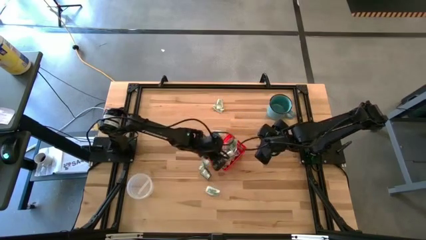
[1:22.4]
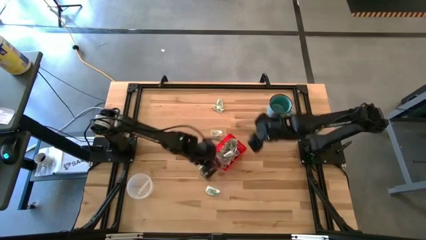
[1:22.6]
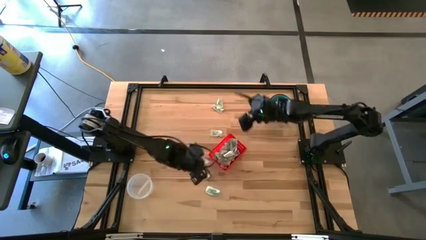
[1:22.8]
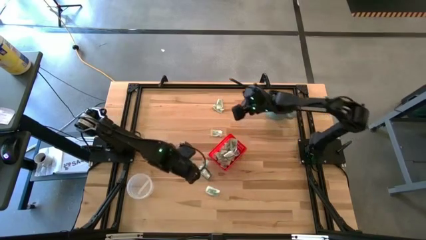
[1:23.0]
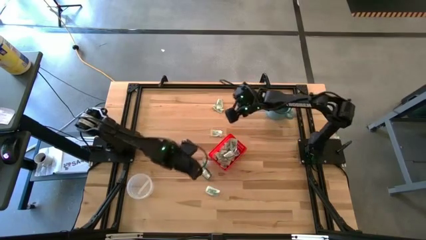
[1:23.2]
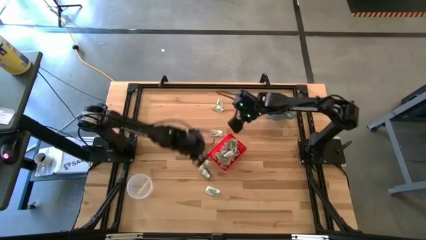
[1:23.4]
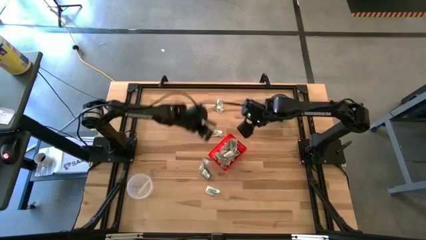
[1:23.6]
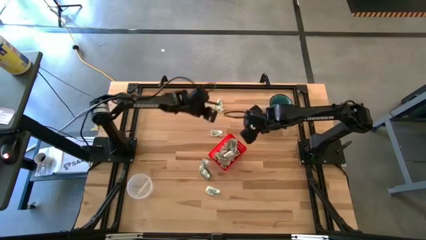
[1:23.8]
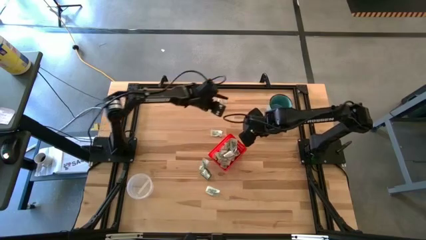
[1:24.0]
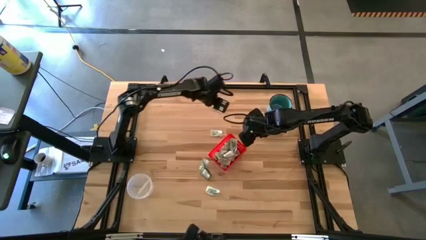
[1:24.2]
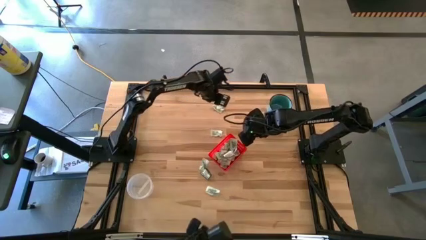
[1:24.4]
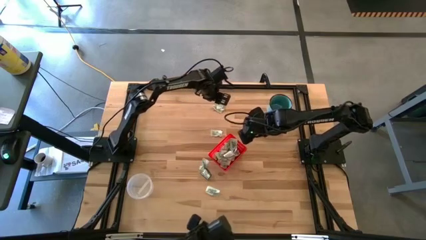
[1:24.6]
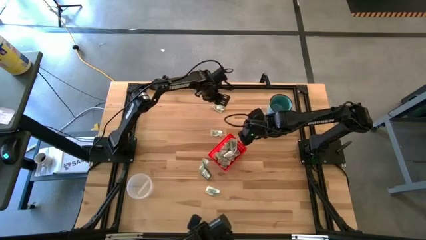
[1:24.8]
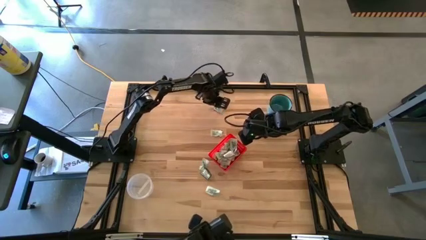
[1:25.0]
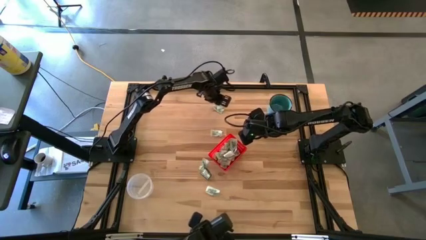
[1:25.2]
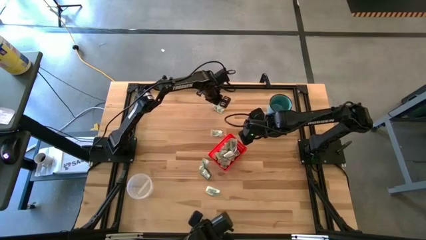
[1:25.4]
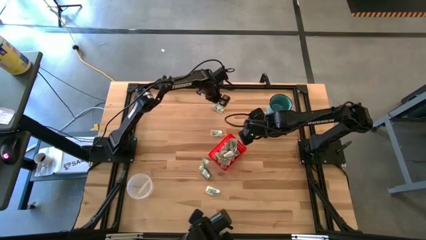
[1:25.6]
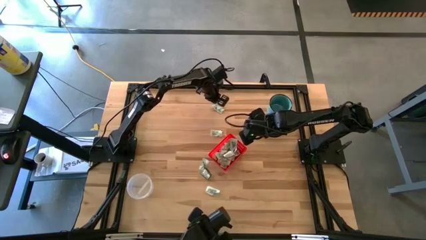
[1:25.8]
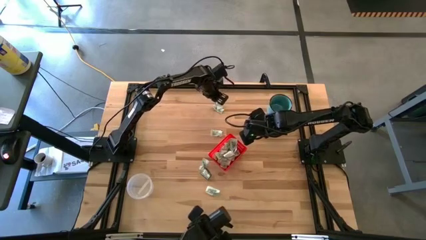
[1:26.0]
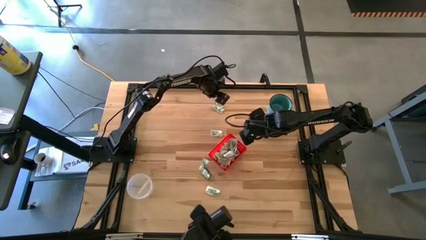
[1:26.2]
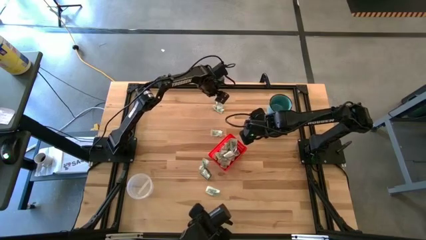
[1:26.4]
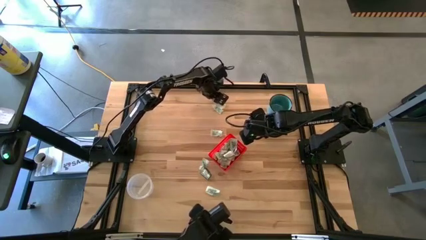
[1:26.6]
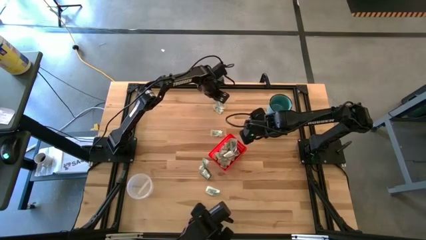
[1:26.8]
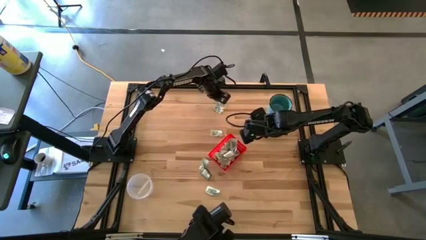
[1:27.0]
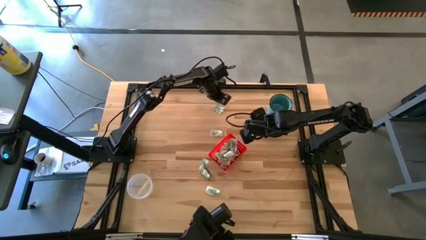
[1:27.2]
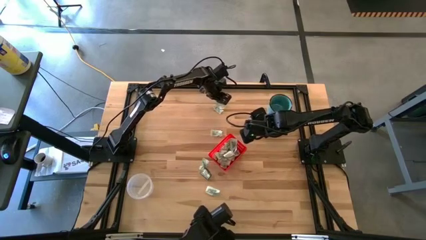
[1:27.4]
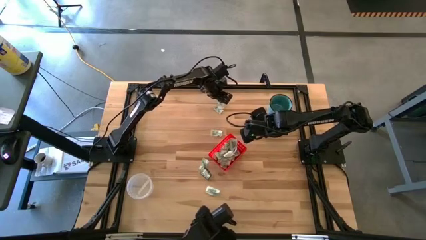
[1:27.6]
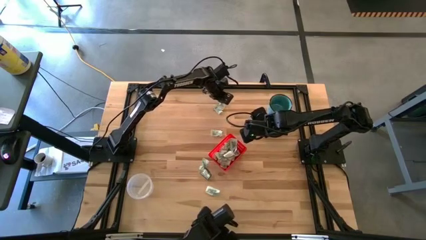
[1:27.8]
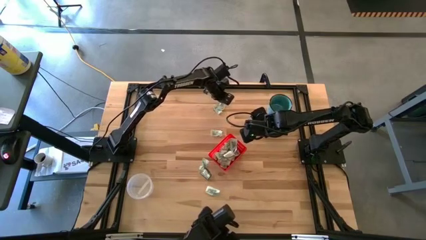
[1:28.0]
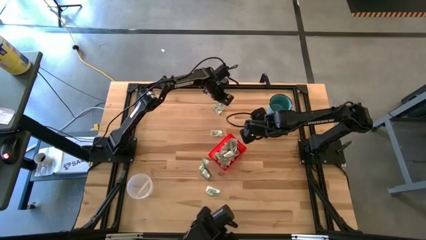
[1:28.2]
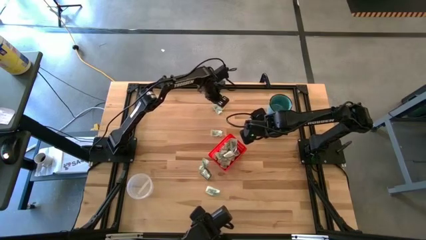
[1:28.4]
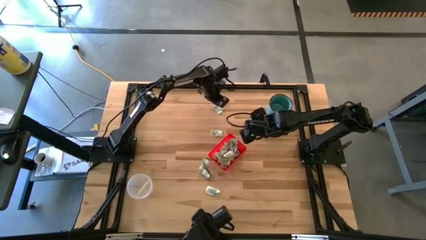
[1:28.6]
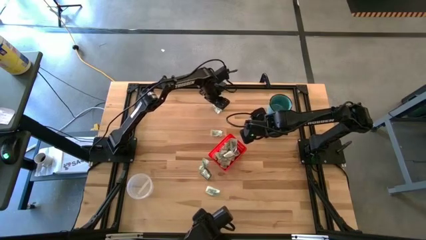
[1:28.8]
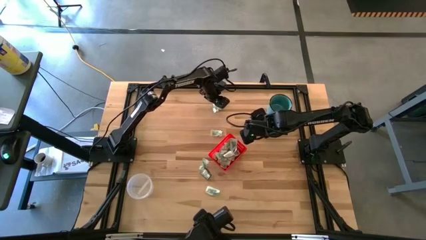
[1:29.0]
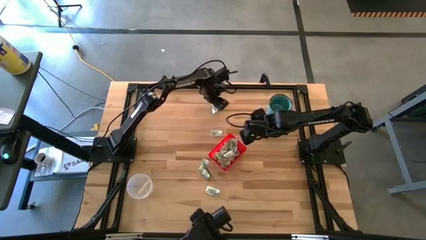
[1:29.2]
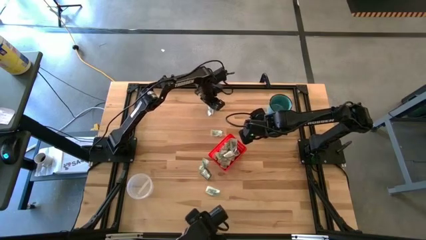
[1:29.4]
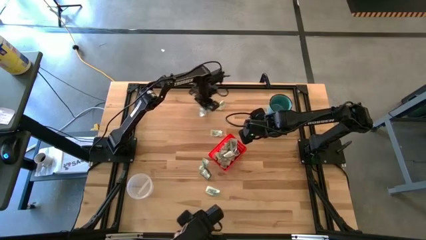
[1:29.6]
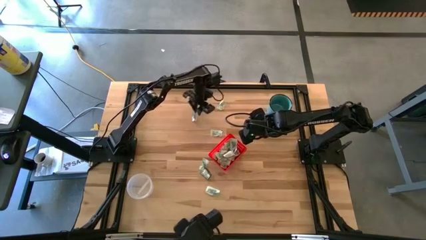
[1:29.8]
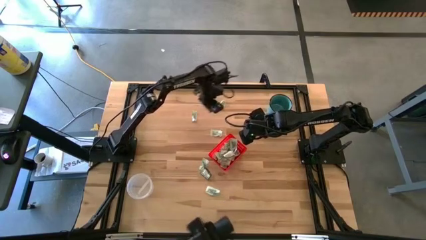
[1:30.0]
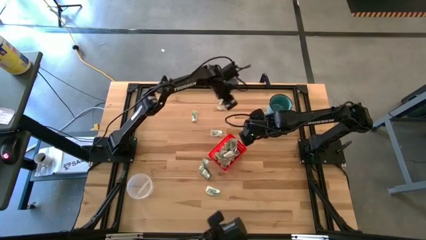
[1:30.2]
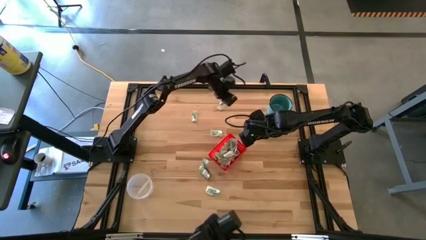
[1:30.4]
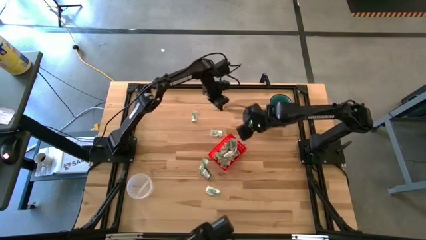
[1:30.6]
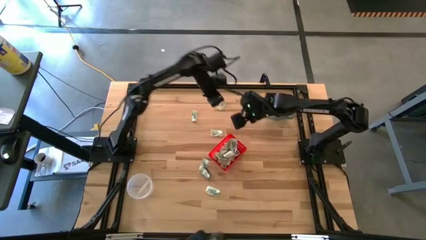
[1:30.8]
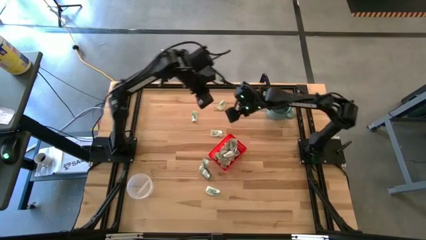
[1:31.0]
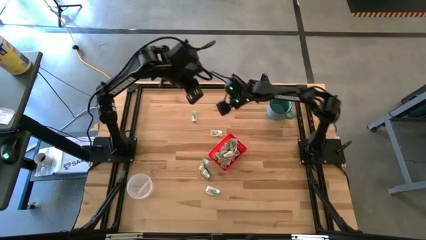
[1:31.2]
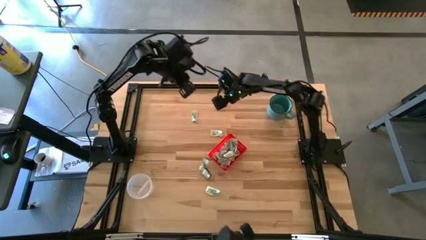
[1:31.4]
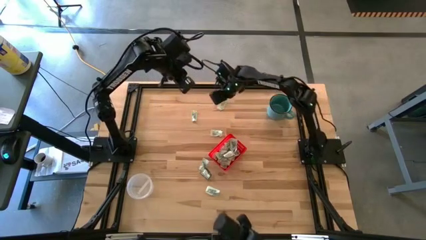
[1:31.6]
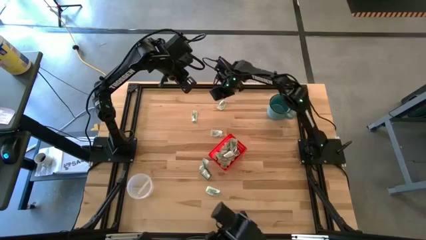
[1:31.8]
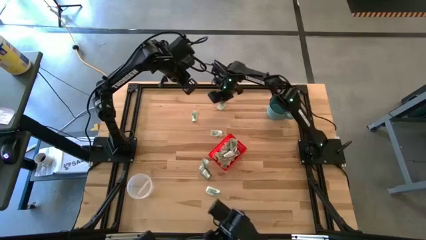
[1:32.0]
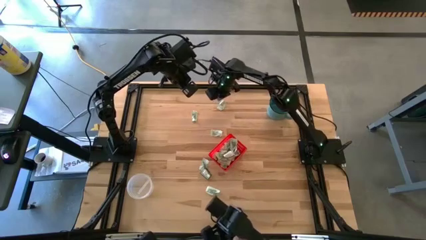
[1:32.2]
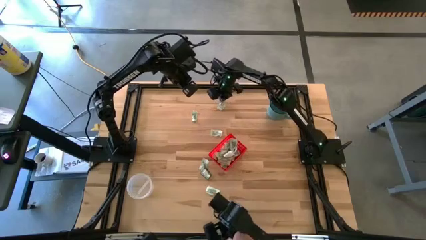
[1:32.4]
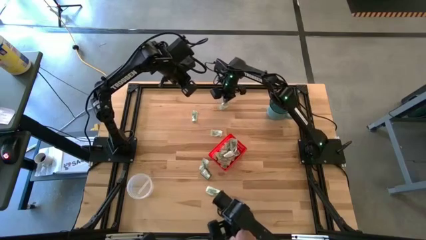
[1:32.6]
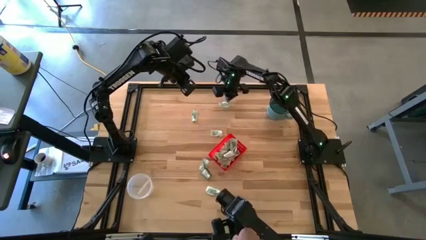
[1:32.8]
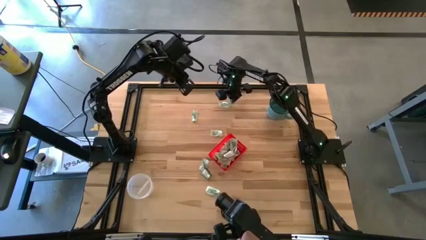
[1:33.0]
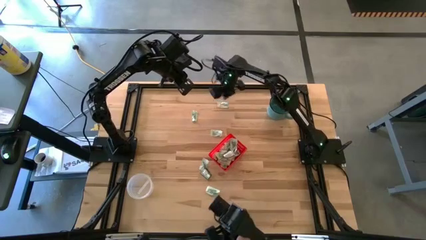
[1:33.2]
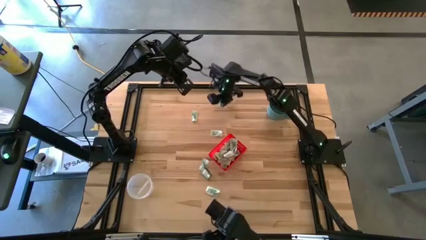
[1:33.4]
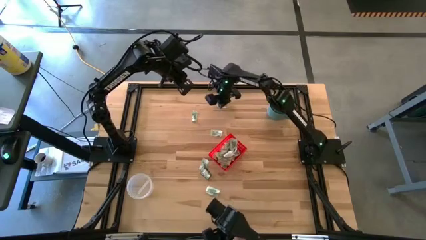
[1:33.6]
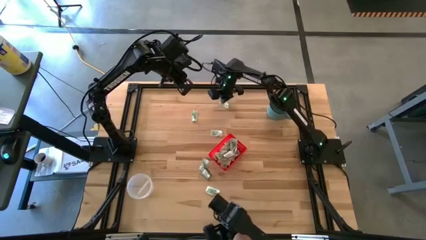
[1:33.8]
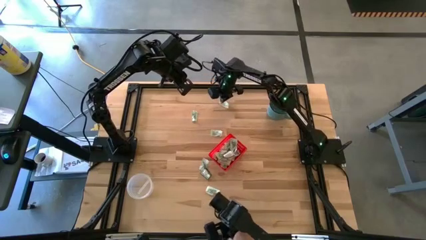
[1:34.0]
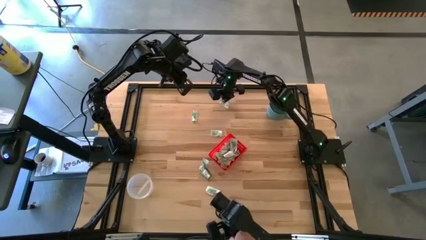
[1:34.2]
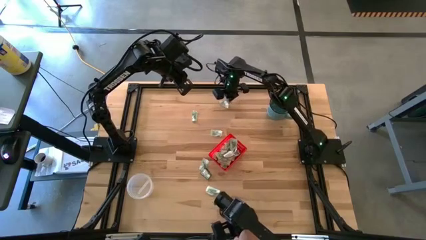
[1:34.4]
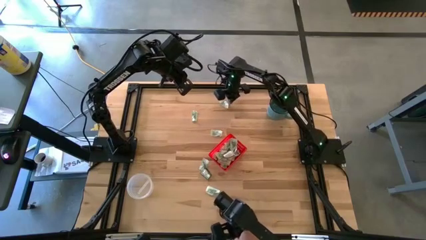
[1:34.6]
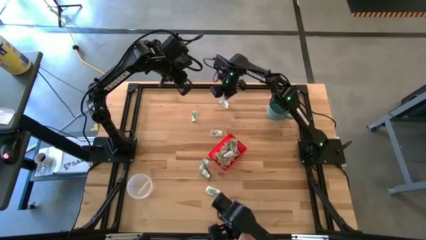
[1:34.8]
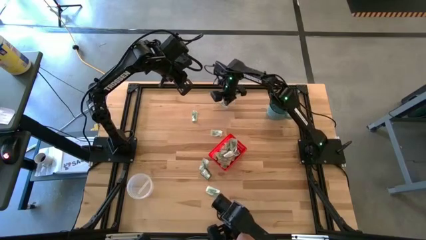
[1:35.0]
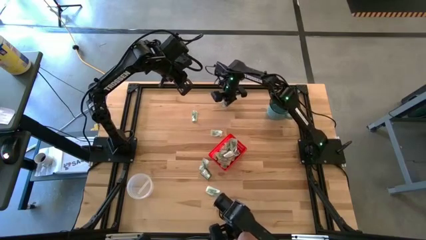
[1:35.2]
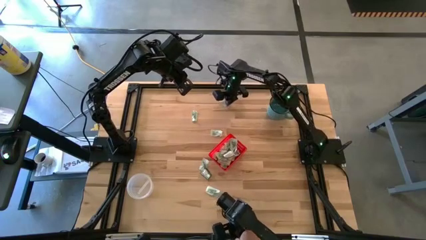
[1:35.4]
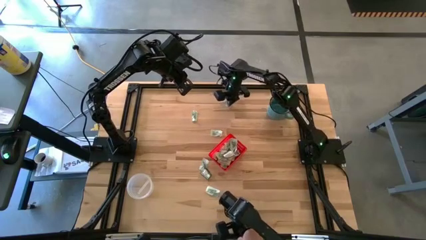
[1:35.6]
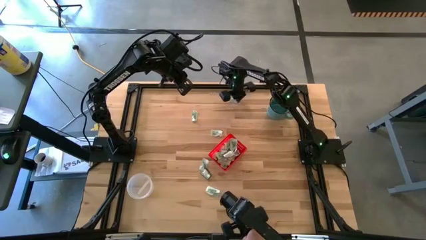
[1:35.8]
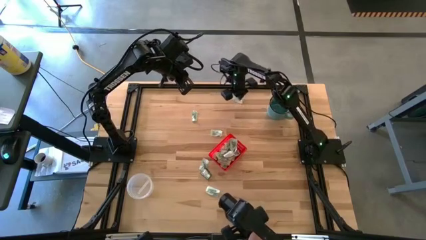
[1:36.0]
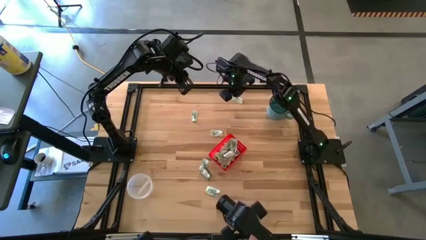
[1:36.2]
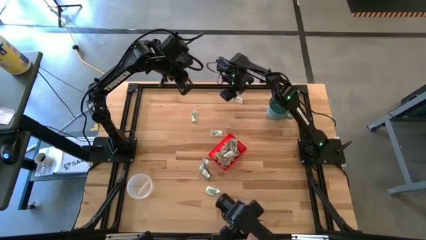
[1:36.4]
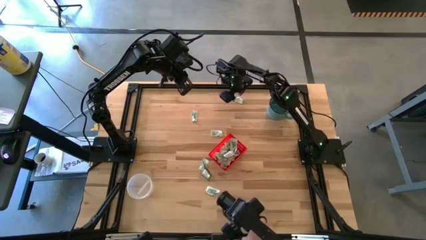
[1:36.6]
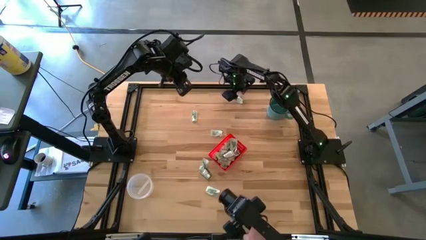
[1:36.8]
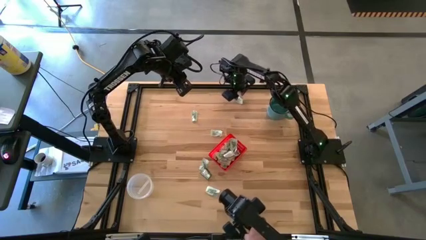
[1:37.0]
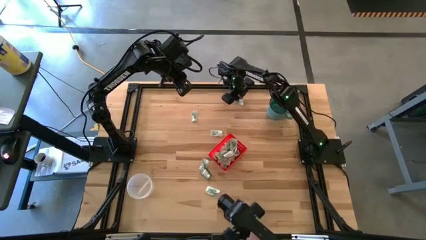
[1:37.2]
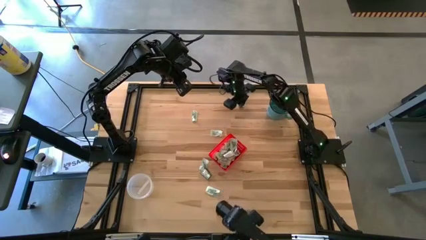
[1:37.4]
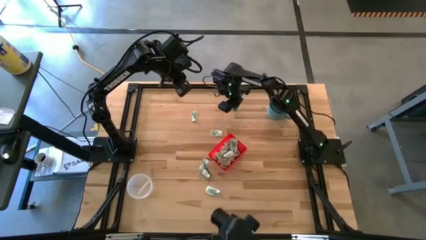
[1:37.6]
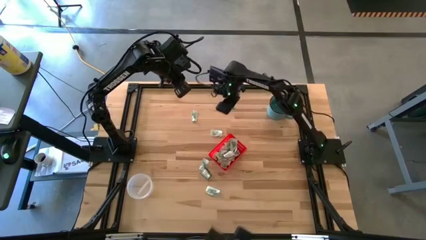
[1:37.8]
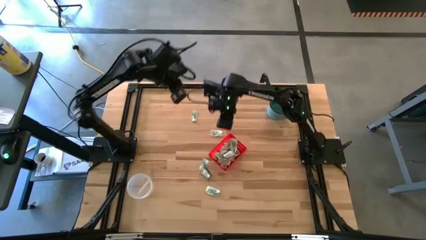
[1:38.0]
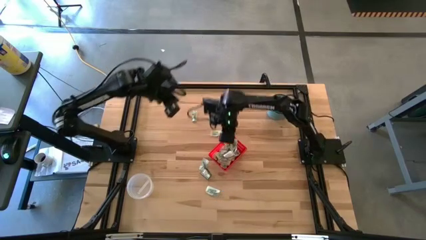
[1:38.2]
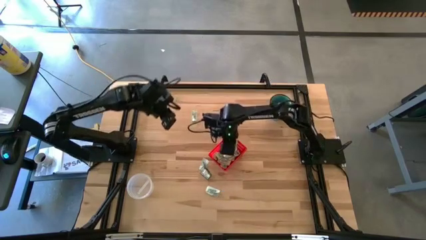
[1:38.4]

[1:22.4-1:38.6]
Task: Pick and place items into bin
Put the white stevia pack into the red bin

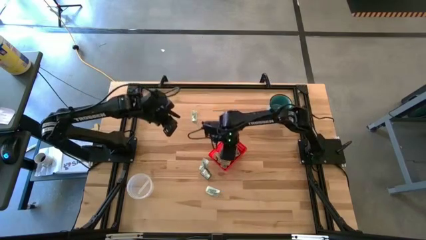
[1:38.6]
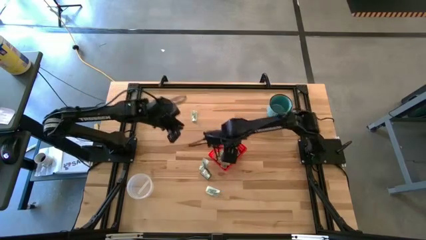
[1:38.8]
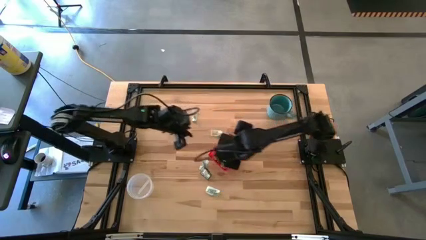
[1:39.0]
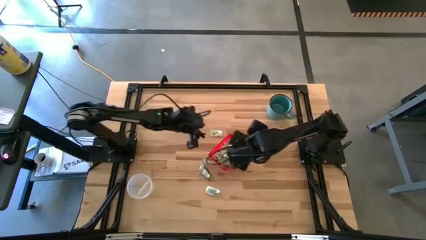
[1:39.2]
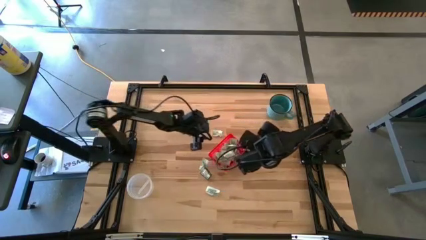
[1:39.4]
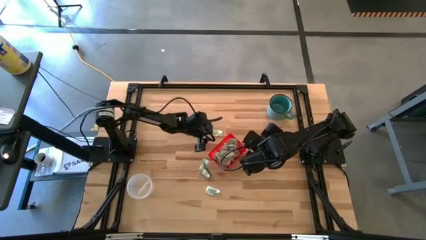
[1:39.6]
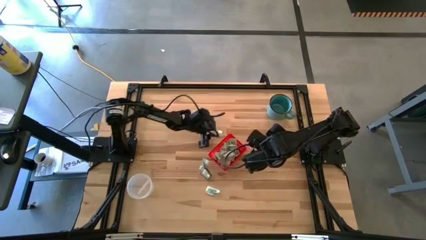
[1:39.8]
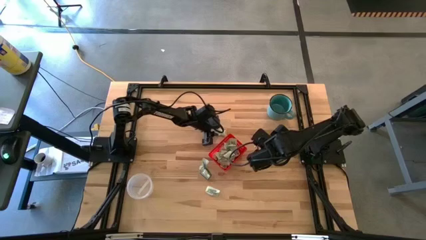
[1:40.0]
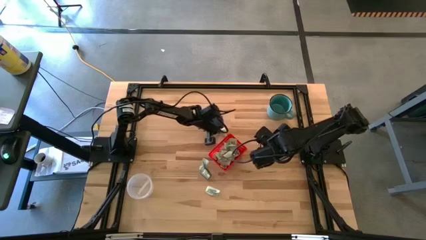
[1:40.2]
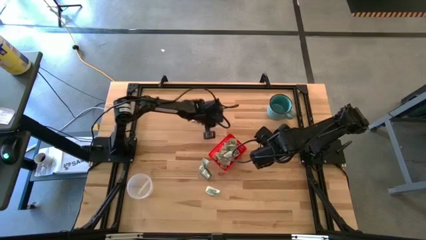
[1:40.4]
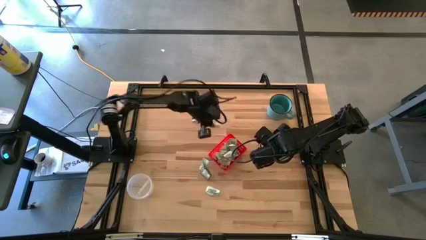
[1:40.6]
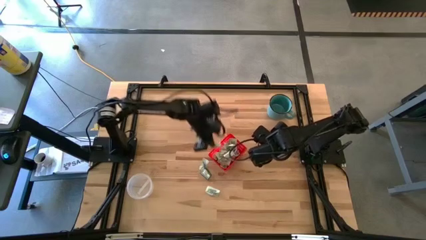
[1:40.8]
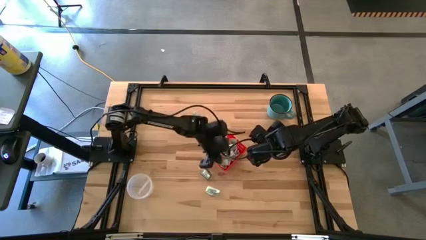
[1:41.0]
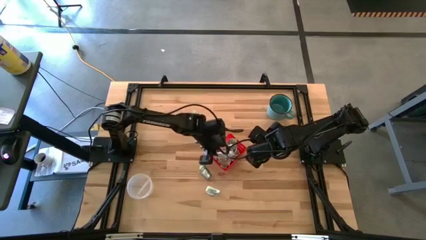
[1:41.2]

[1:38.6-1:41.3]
Put the white stevia pack into the red bin
